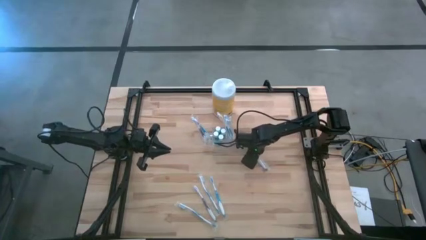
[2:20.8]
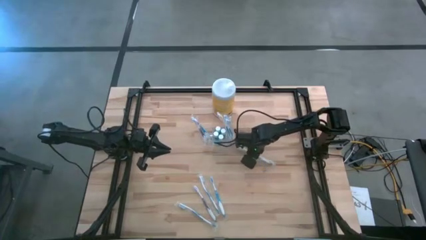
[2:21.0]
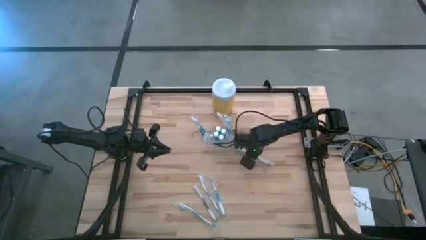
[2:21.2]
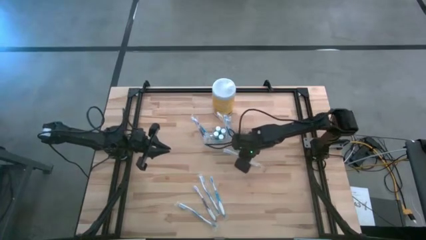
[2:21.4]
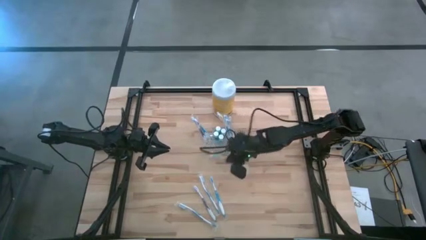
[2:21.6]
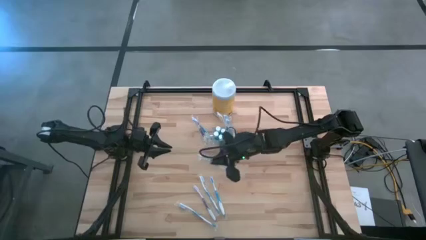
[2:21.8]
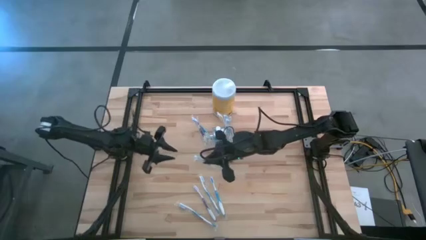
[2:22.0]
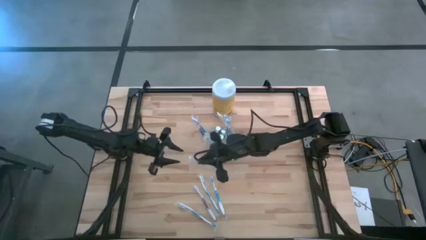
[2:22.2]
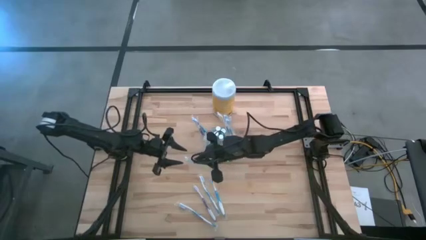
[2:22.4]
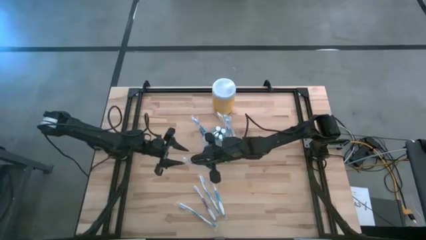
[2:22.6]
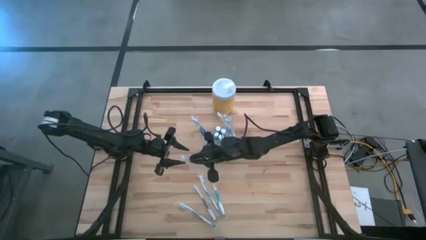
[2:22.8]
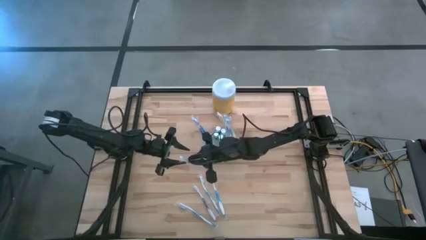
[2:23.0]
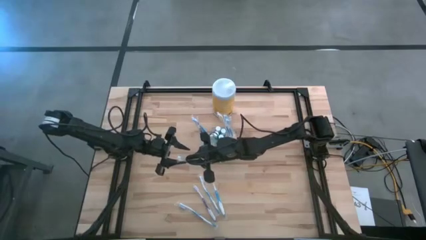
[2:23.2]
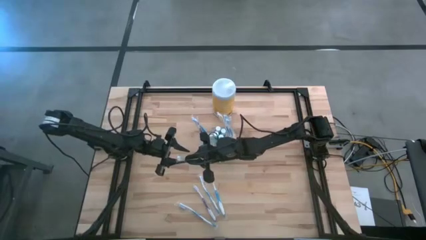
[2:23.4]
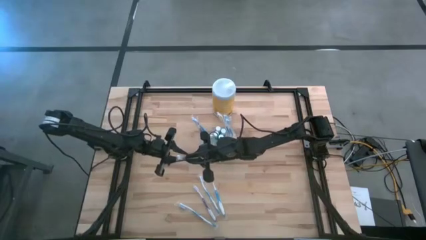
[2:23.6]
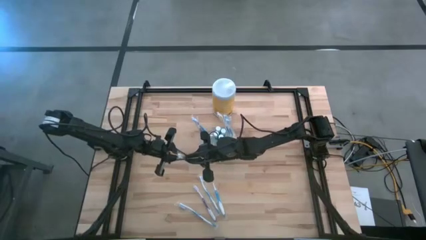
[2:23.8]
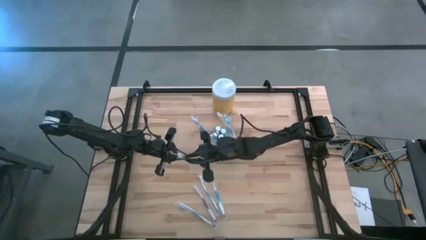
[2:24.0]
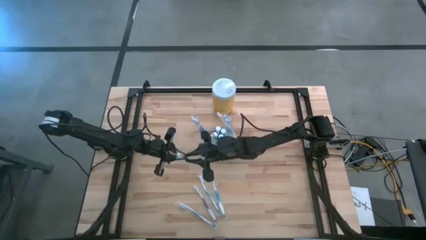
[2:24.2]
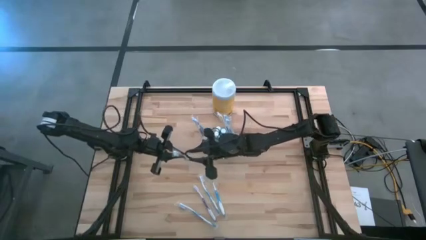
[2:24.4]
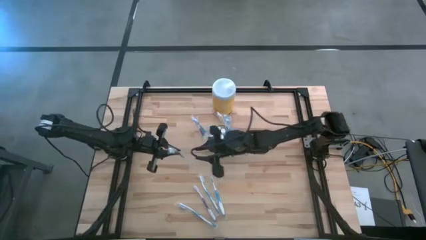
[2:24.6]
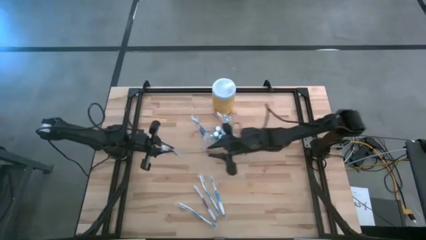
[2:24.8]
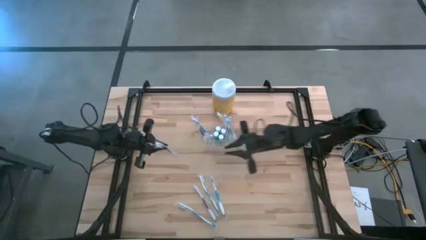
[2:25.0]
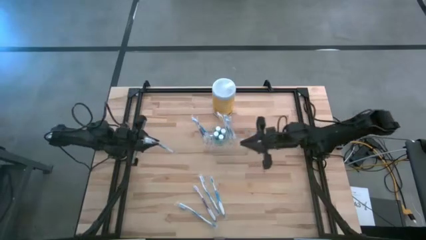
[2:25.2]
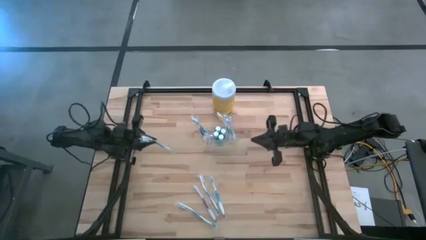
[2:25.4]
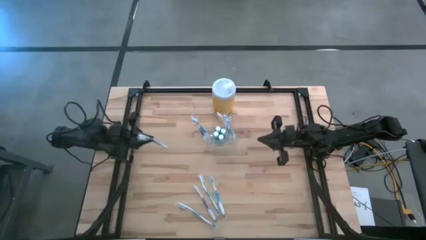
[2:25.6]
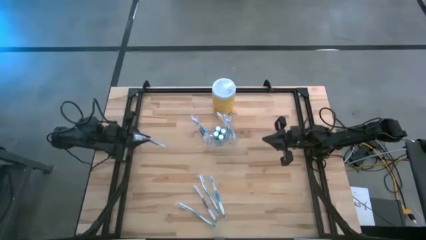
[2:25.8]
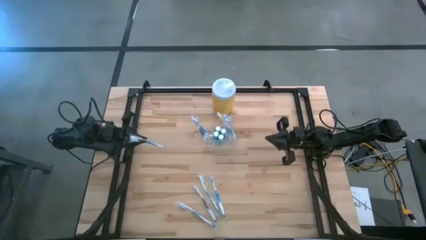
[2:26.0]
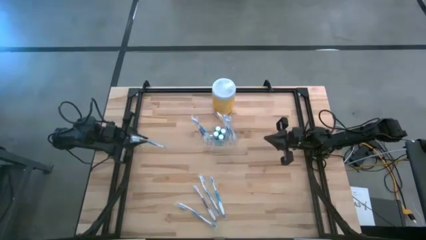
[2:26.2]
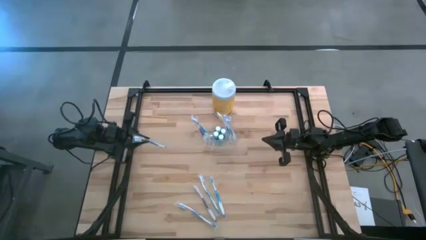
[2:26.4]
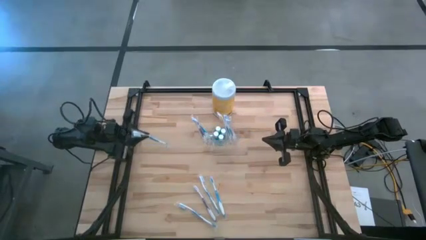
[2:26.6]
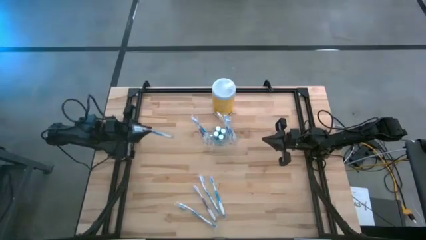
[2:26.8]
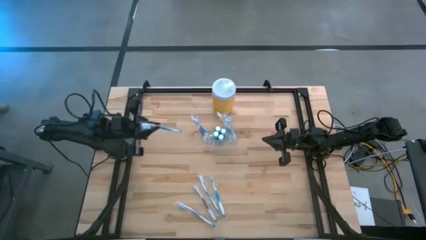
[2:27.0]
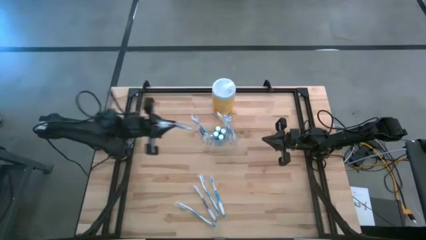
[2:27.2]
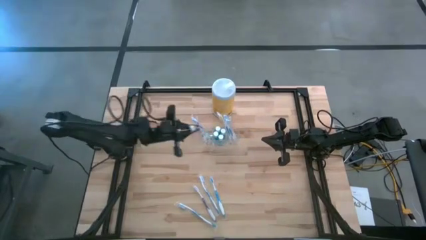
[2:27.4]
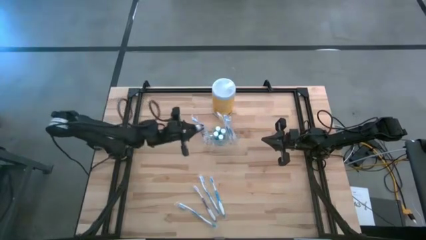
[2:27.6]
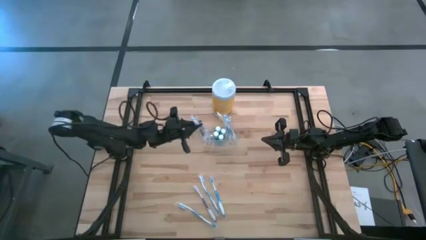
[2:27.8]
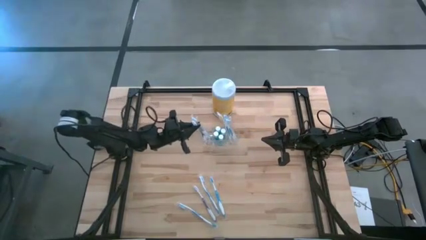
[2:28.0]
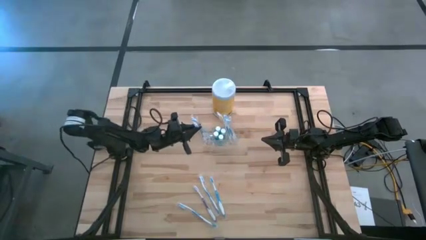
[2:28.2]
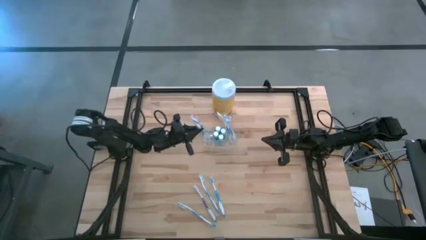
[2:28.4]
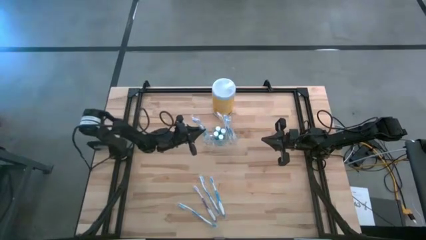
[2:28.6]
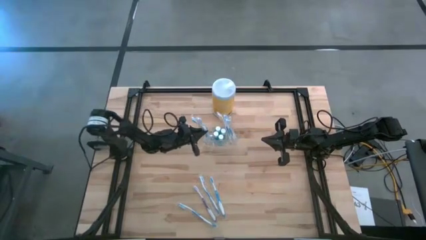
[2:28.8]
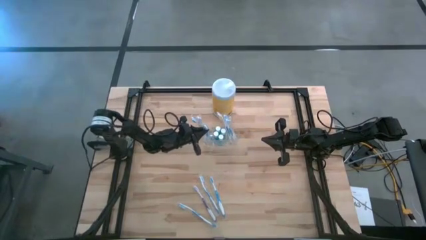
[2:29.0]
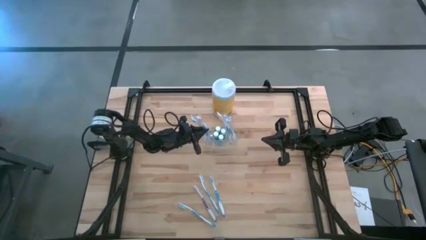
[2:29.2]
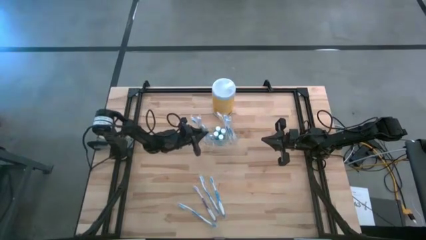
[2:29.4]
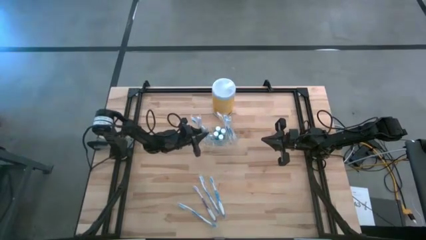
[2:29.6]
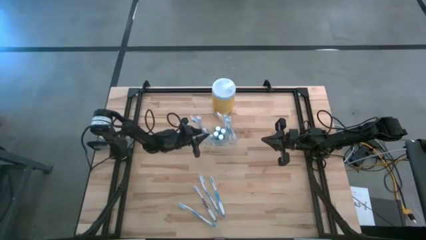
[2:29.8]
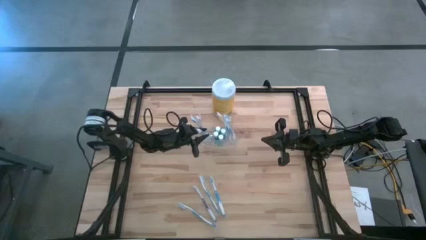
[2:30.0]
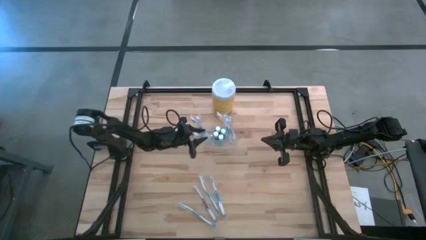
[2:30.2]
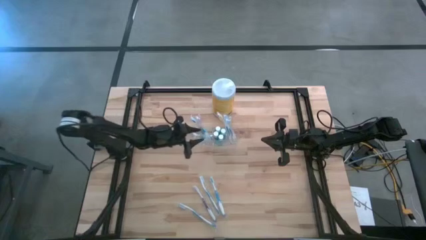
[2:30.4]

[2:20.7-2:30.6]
Task: Pick & Place toothbrushing station
Put the blue toothbrush into the transparent organizer

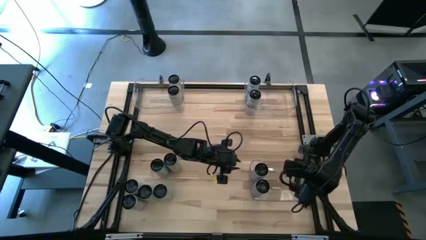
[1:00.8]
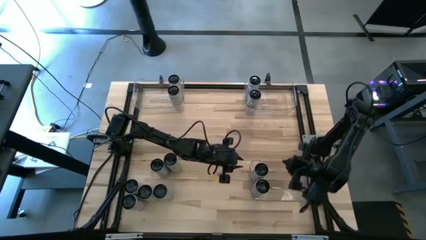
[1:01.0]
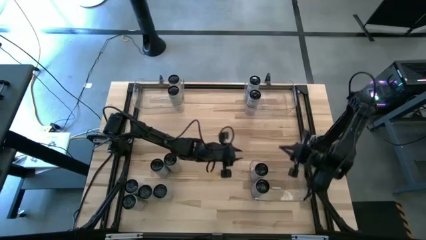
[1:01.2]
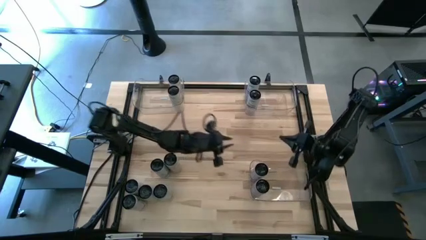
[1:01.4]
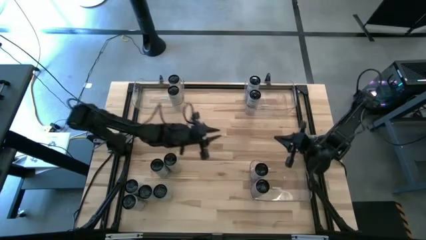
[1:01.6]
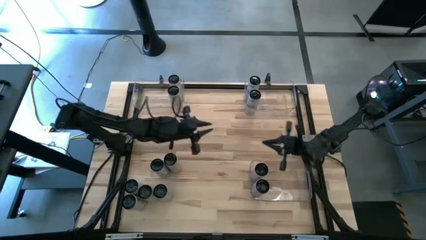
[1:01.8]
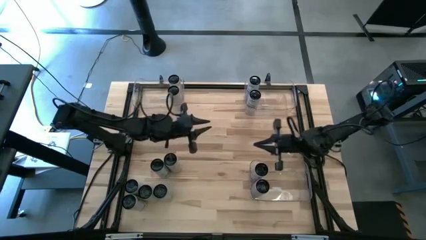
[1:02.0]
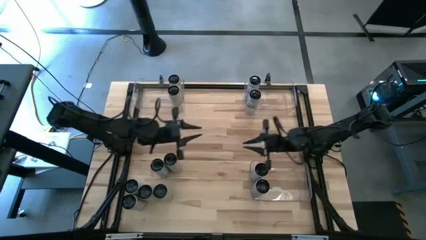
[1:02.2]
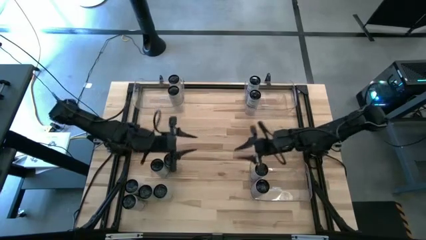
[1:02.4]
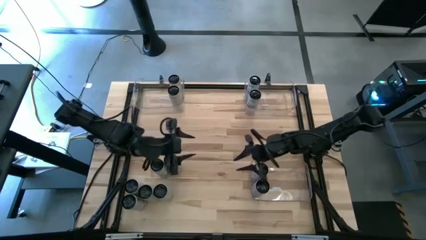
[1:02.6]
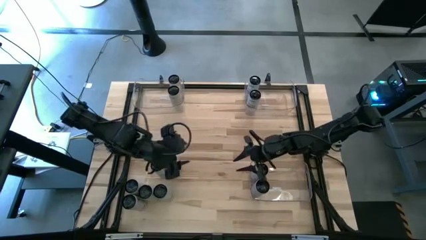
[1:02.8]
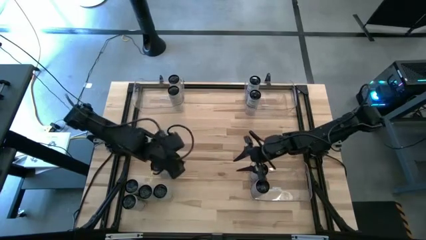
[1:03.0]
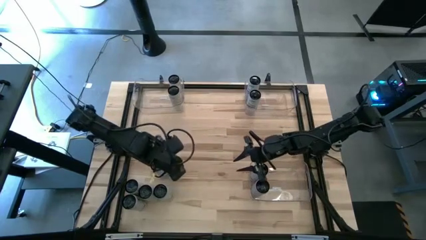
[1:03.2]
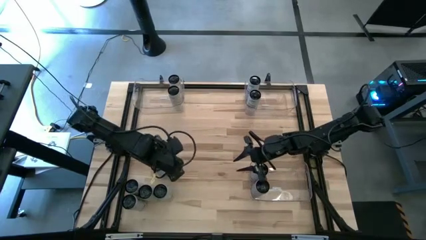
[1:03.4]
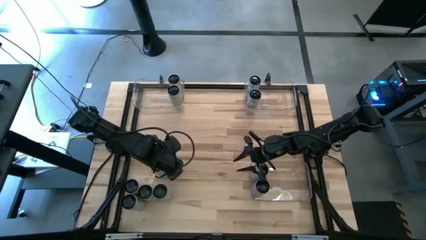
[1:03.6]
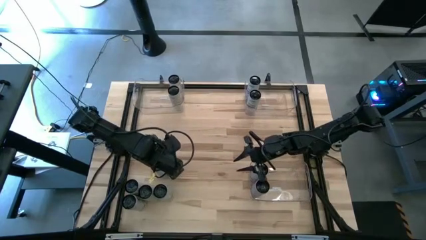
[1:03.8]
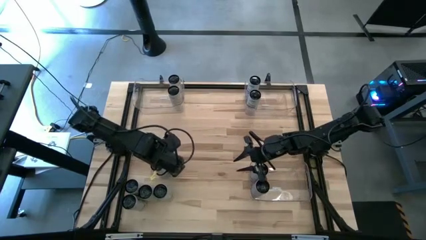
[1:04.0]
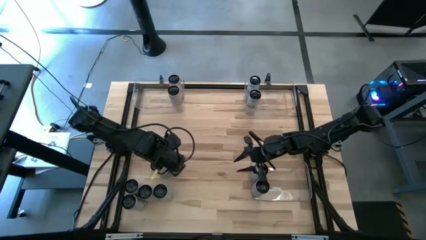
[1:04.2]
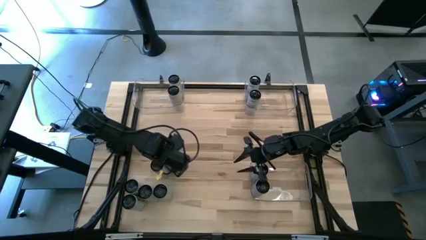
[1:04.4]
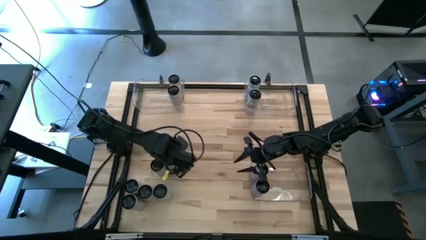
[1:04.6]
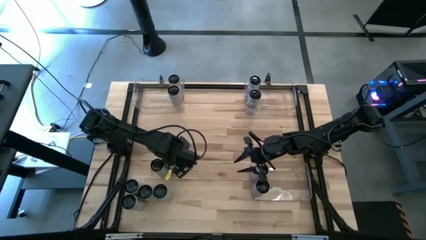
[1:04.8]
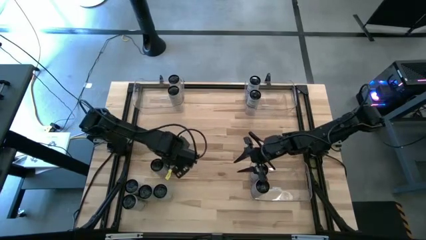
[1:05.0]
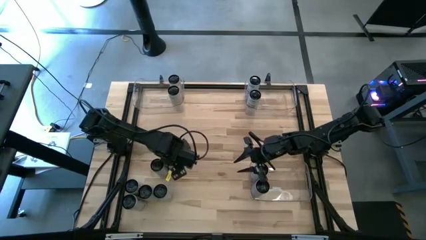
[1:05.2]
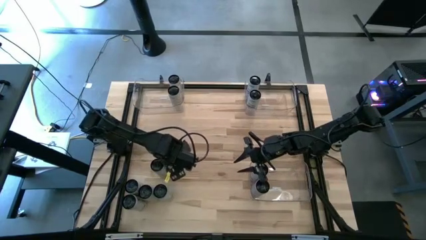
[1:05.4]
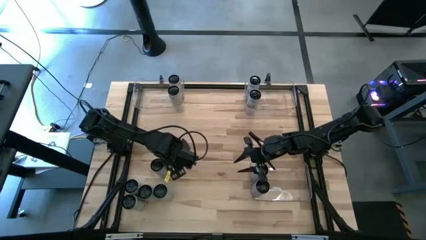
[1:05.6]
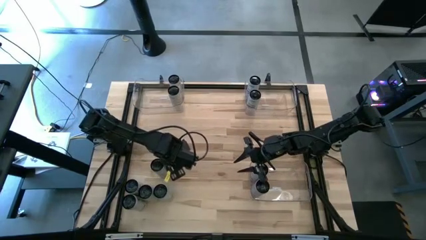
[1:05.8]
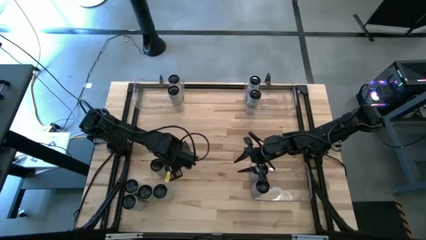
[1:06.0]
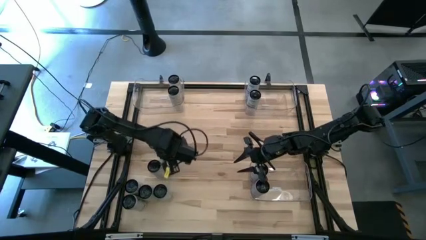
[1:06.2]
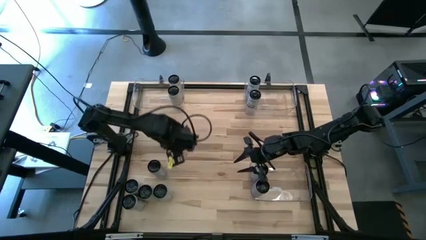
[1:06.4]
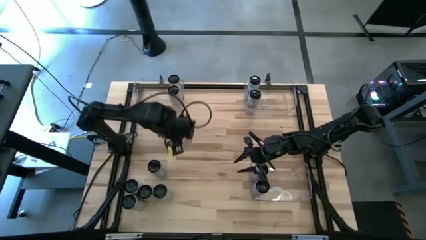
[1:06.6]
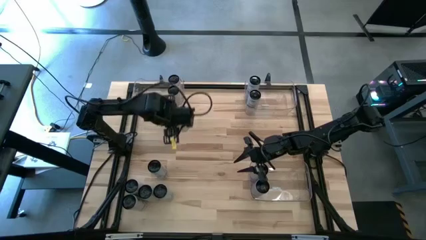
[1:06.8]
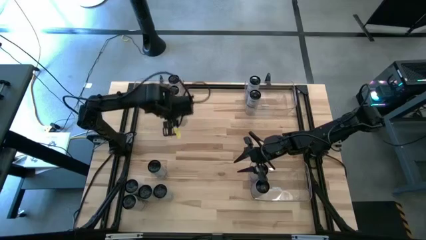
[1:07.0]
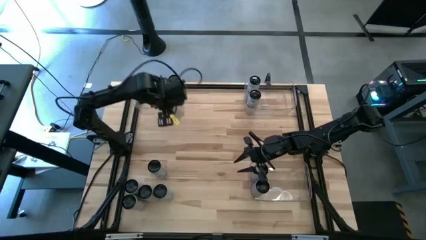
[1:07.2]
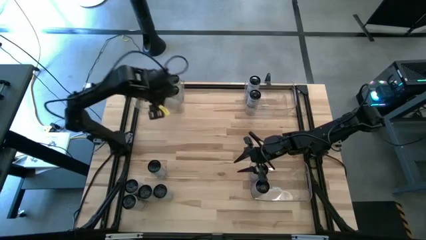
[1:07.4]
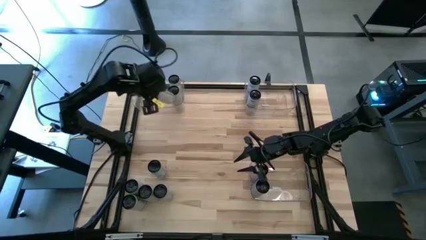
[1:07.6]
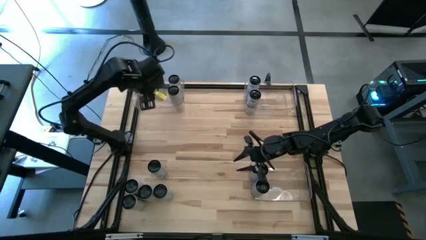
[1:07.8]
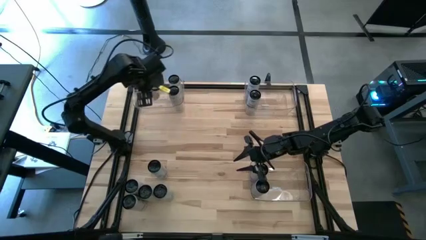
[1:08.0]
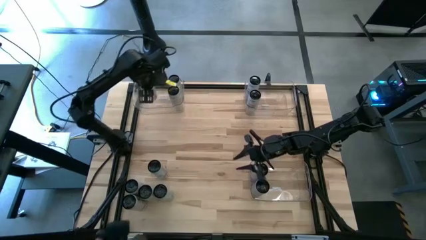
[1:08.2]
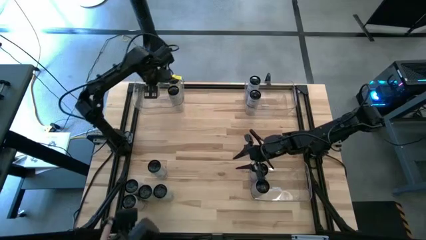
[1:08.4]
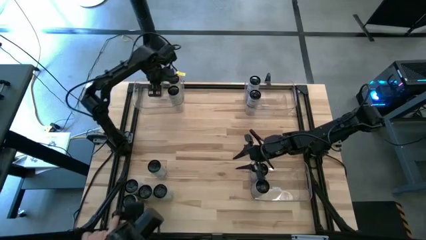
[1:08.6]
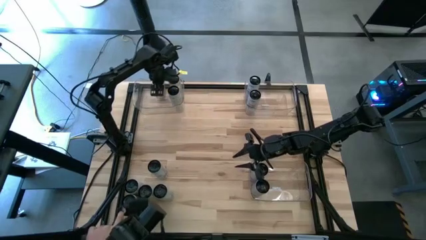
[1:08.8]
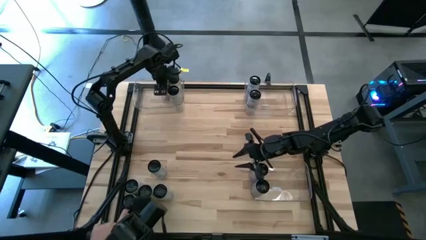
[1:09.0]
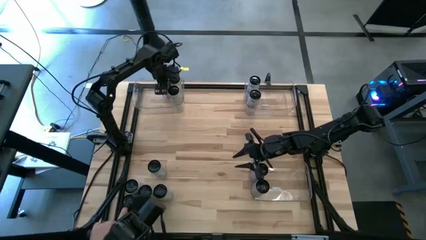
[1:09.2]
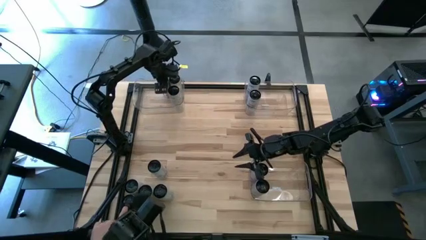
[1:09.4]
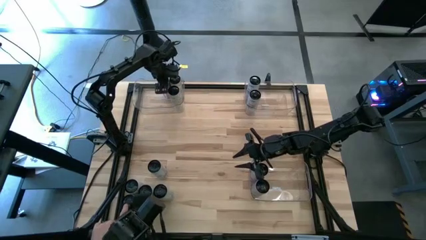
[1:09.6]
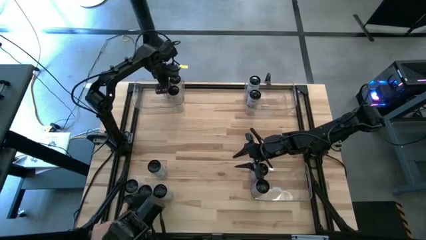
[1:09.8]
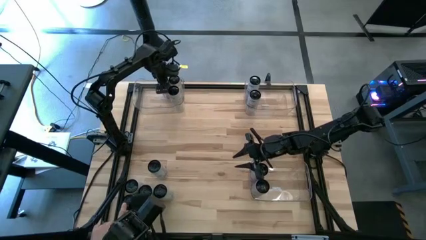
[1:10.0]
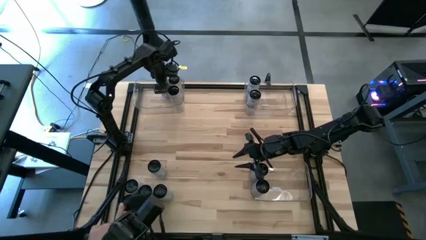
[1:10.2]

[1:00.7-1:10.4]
Task: Sort soda cans
Put the white-yellow soda can into the top left transparent bin
